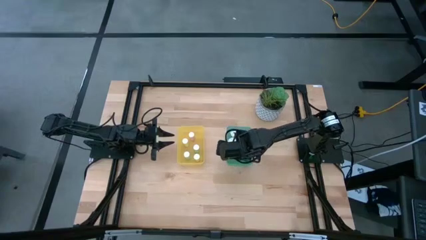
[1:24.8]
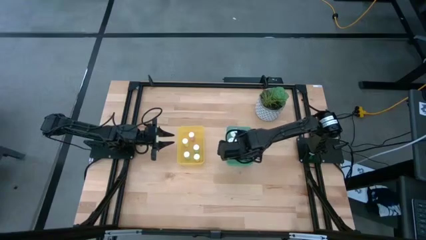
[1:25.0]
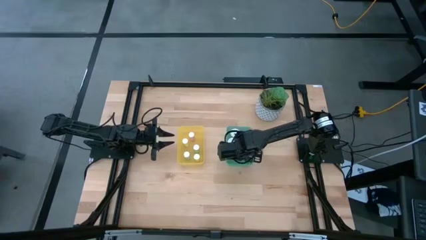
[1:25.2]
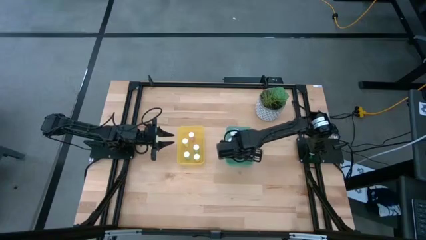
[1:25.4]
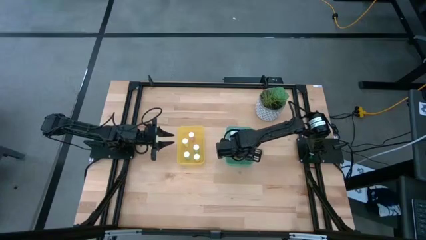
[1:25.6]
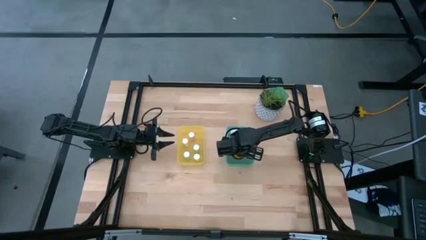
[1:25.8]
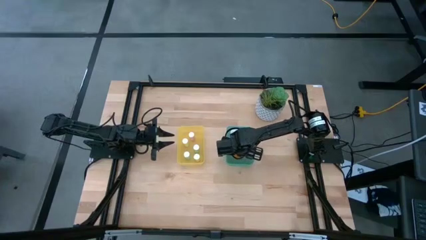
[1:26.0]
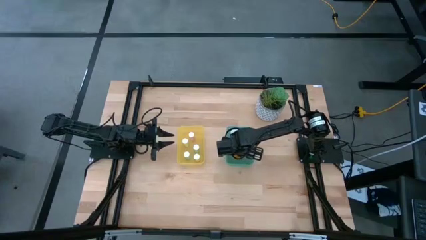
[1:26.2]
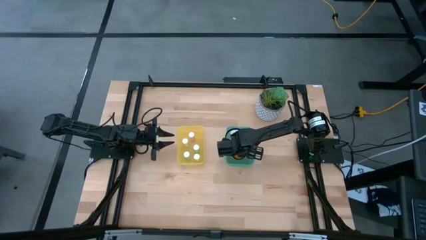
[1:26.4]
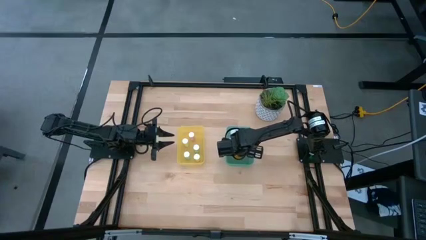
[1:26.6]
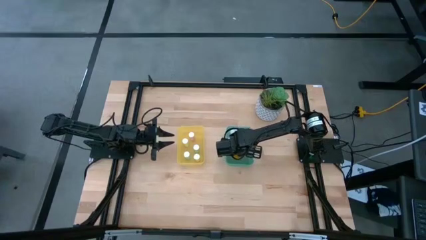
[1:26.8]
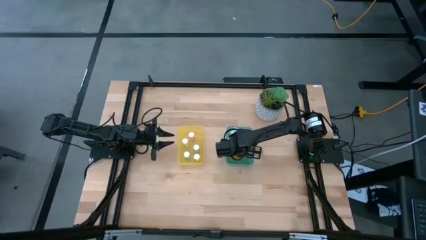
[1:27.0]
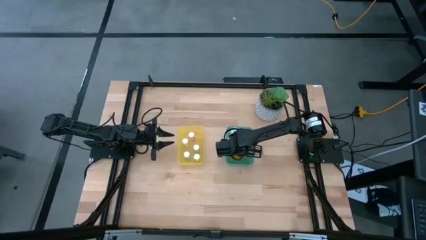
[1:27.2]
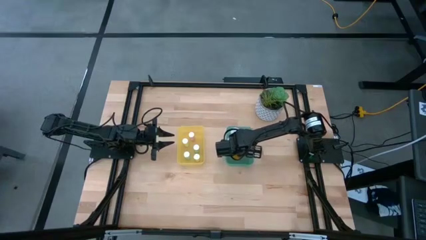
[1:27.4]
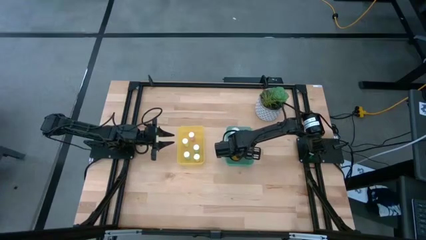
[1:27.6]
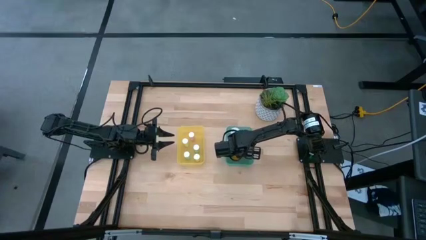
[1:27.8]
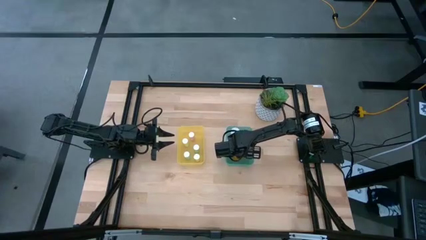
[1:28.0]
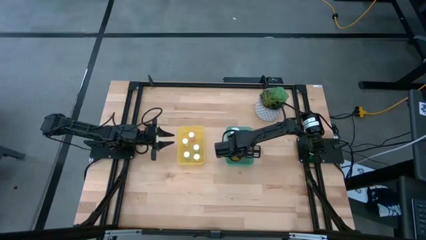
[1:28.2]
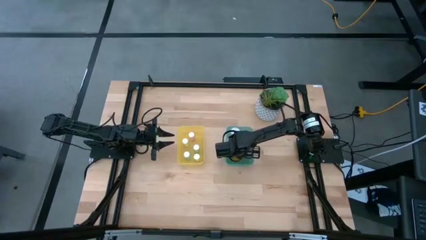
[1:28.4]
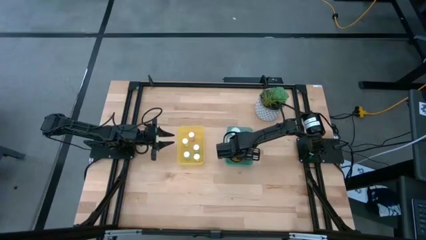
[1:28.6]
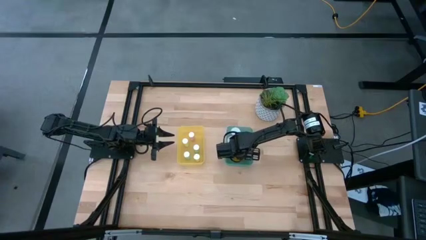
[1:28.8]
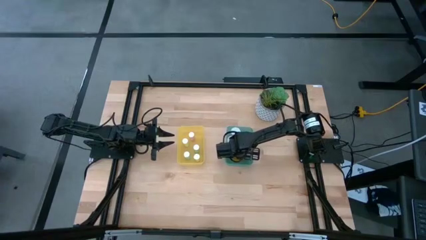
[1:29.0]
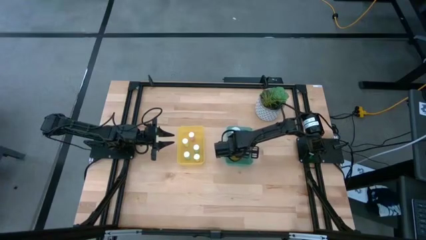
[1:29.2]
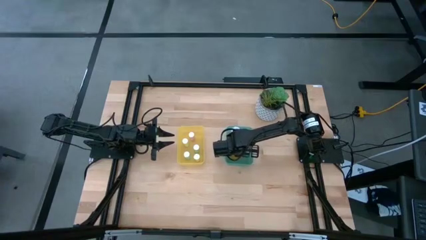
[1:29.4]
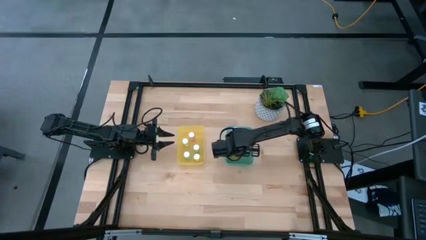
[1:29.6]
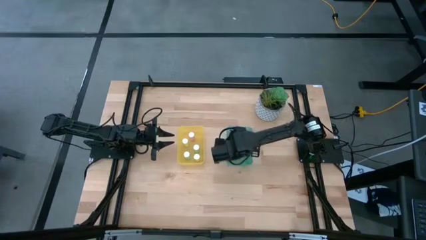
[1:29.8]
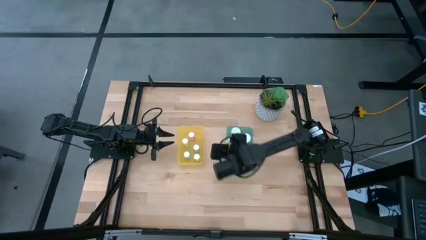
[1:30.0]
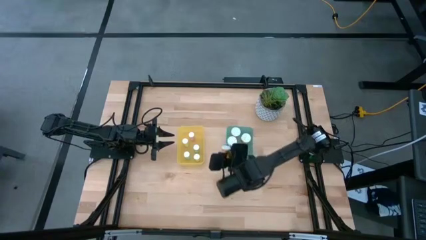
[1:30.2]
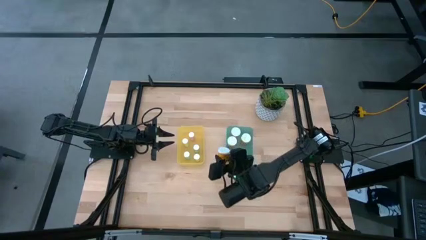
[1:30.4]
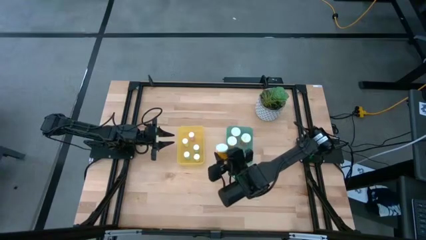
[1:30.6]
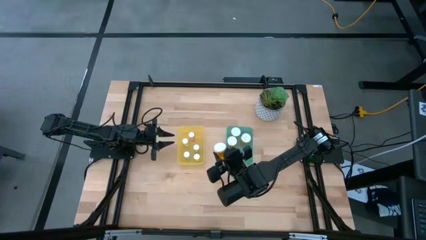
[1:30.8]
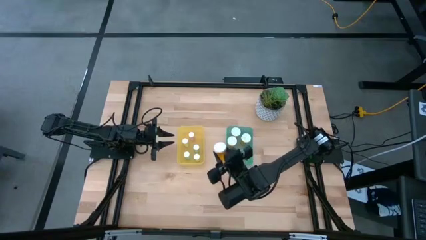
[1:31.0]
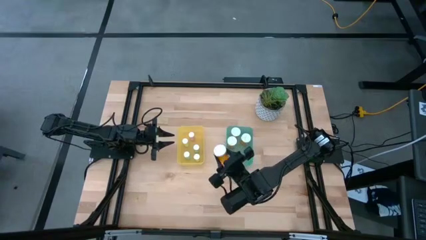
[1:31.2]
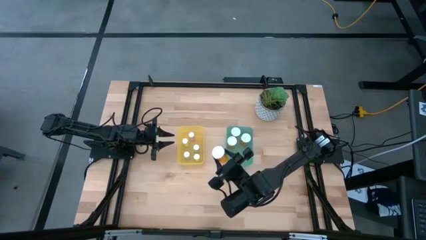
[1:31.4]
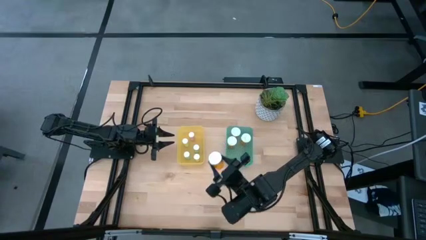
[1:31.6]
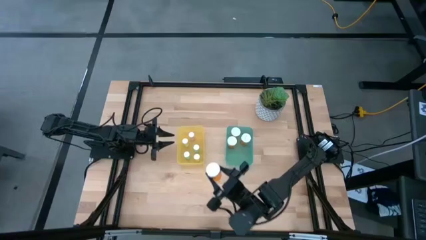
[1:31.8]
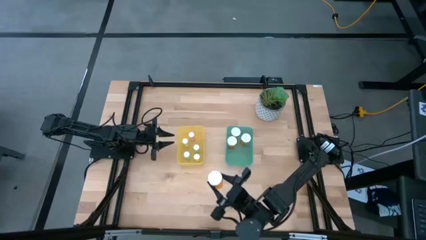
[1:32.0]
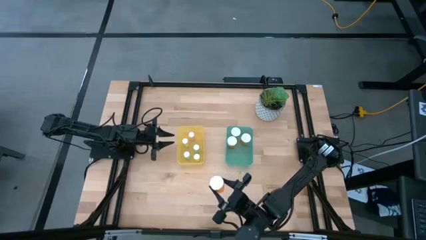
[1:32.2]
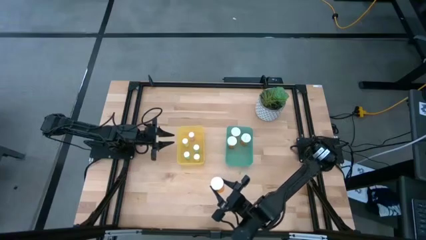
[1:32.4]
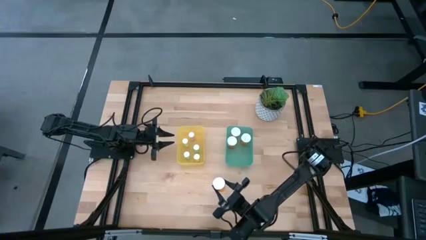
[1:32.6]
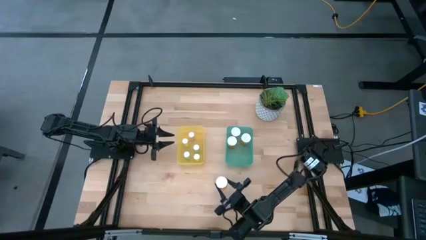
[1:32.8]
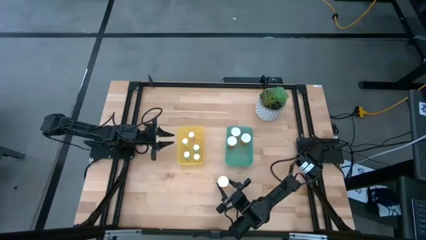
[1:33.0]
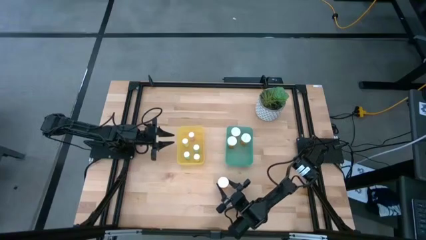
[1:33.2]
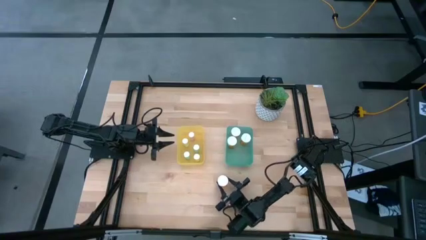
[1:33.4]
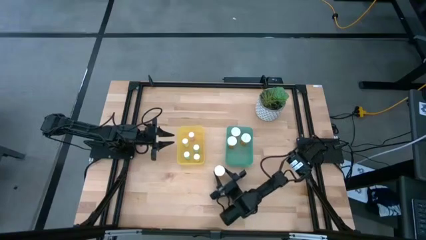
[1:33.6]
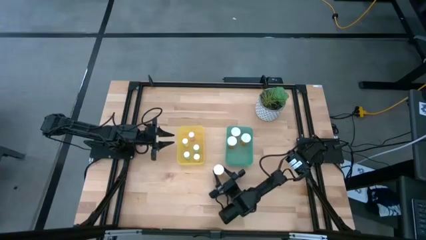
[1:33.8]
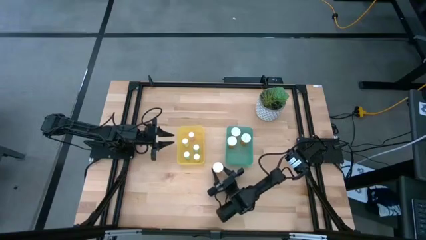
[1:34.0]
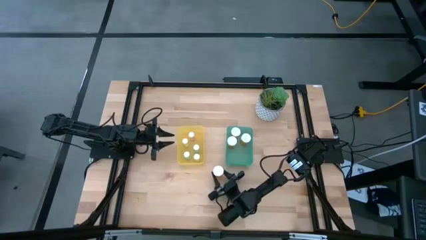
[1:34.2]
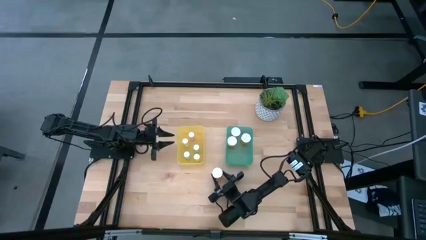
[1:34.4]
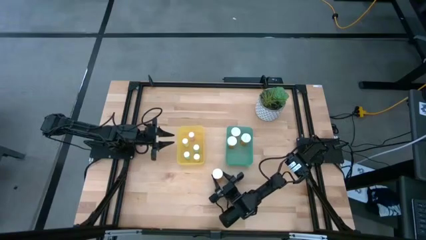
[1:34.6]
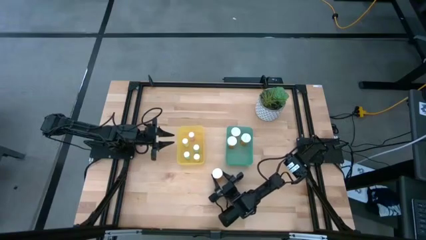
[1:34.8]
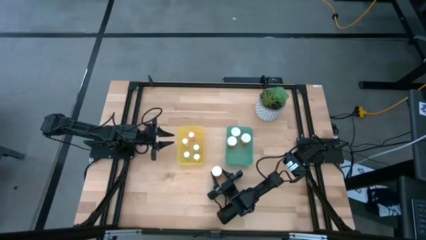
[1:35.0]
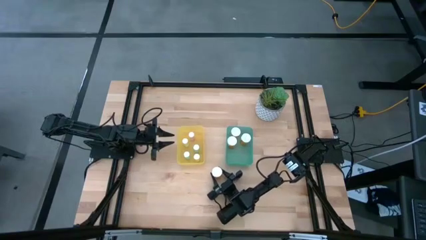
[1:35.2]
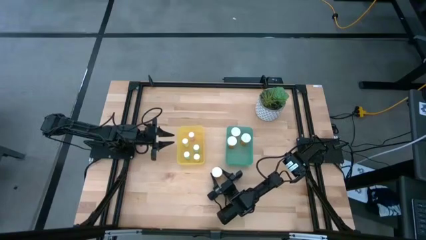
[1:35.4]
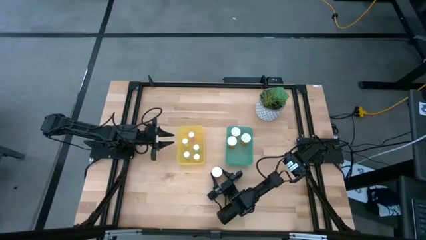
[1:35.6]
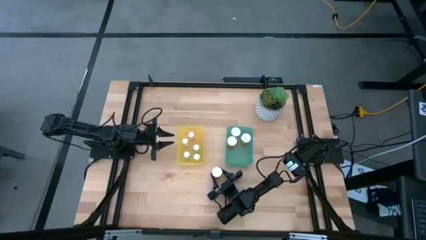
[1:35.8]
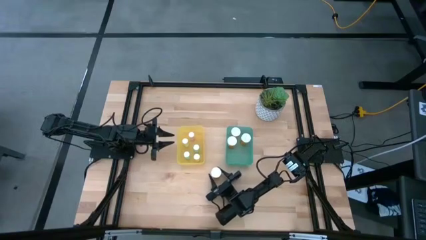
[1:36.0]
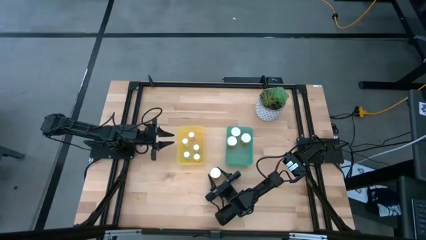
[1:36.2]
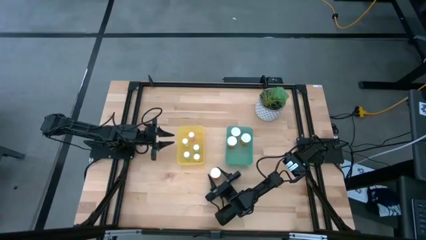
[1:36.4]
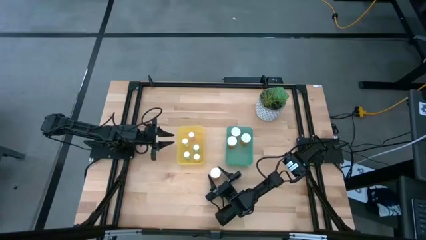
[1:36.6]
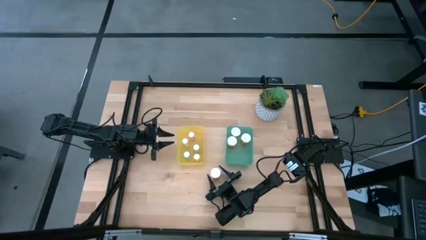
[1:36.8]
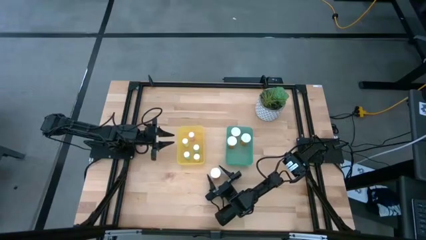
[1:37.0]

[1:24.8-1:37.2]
Task: Pick and place medicine bottles into bin by pill shape (circle, oval)
Put the large orange pill bottle into the green bin
